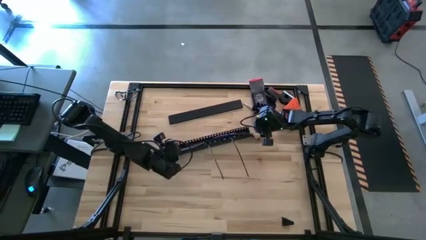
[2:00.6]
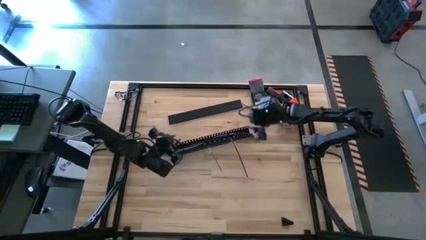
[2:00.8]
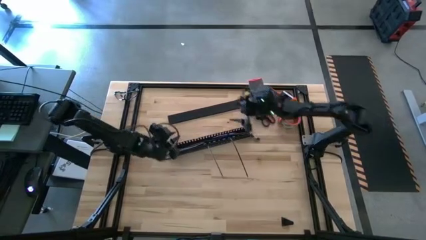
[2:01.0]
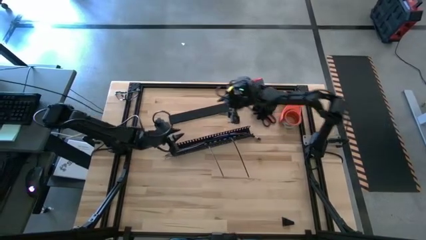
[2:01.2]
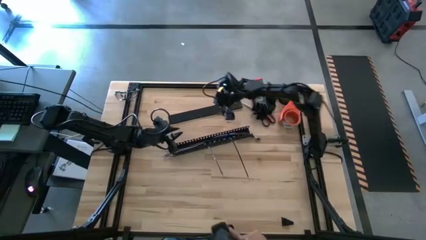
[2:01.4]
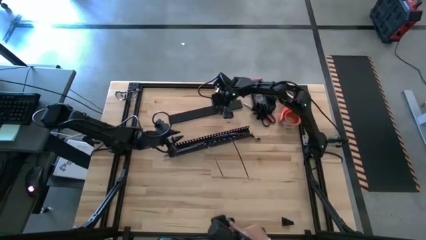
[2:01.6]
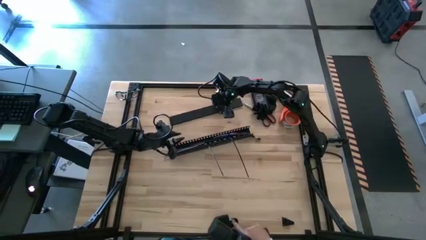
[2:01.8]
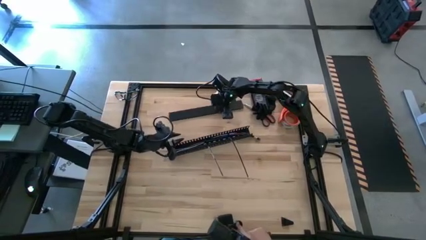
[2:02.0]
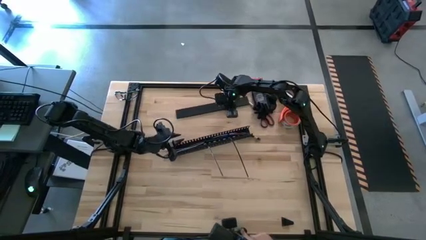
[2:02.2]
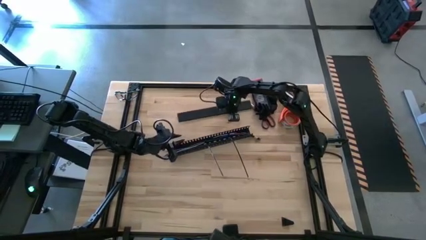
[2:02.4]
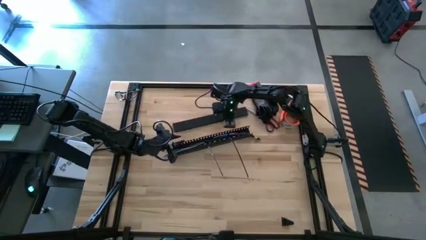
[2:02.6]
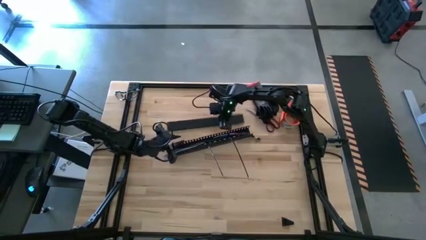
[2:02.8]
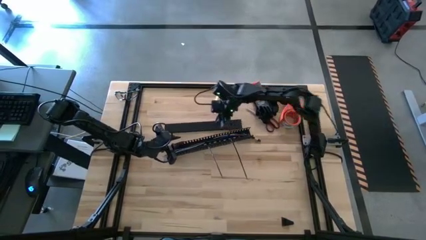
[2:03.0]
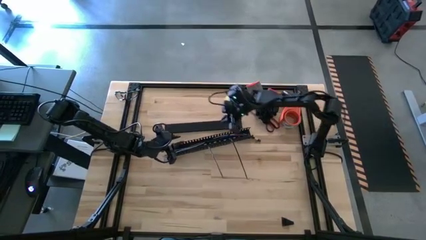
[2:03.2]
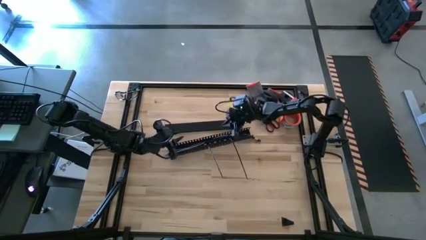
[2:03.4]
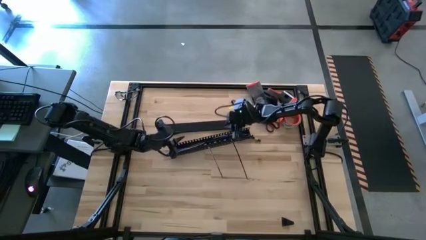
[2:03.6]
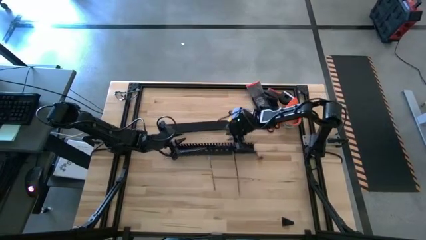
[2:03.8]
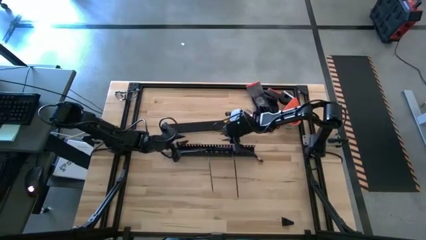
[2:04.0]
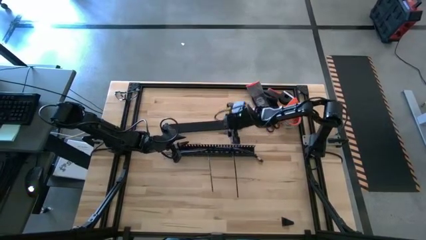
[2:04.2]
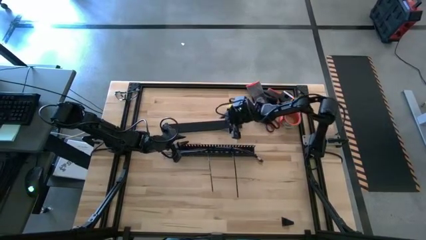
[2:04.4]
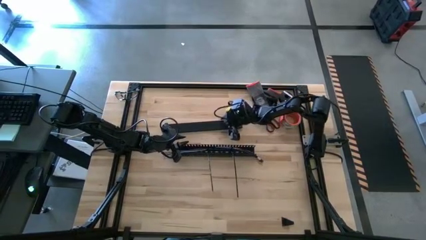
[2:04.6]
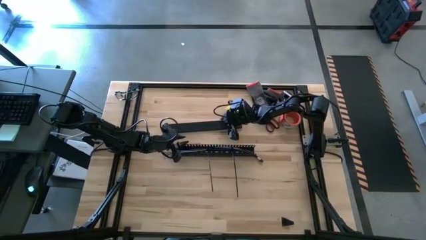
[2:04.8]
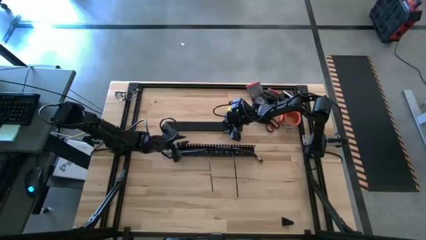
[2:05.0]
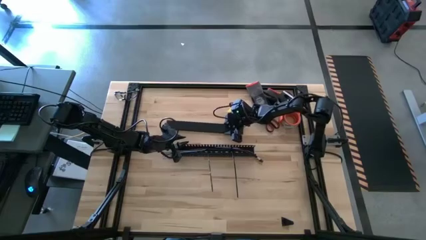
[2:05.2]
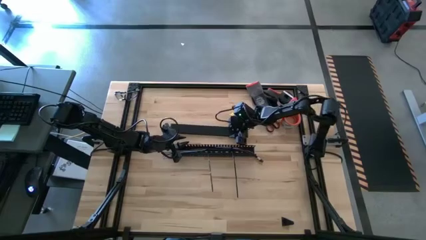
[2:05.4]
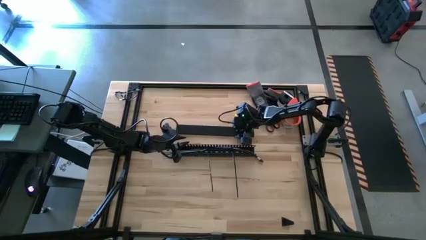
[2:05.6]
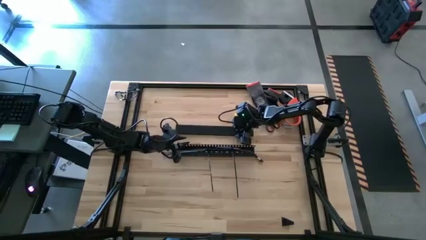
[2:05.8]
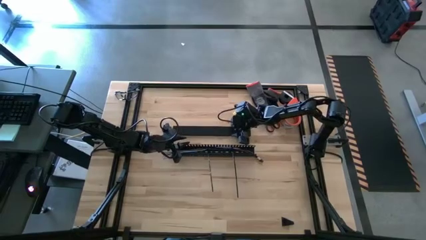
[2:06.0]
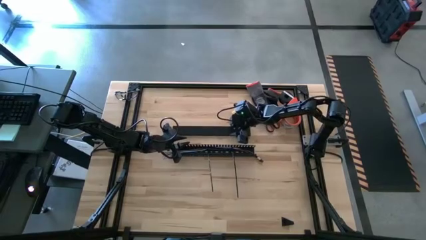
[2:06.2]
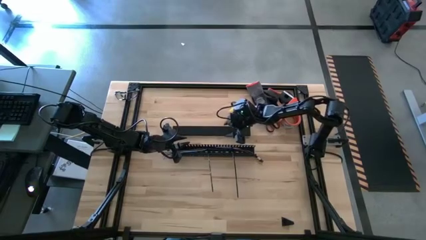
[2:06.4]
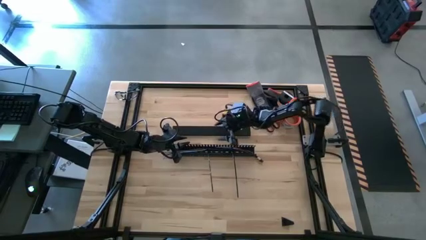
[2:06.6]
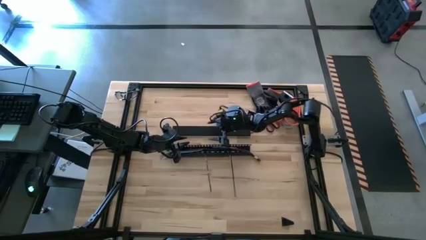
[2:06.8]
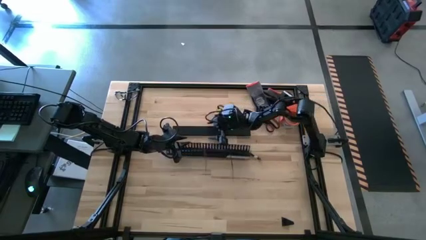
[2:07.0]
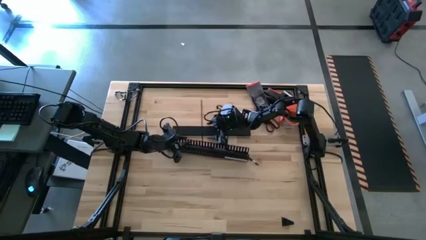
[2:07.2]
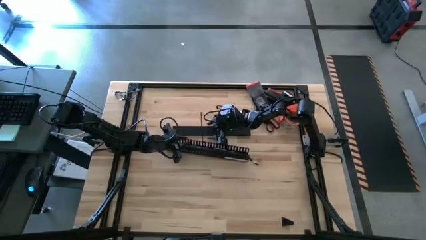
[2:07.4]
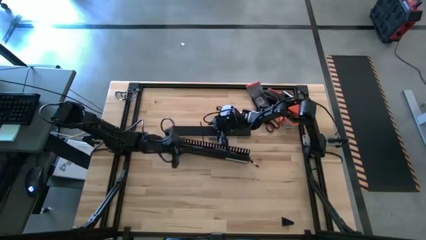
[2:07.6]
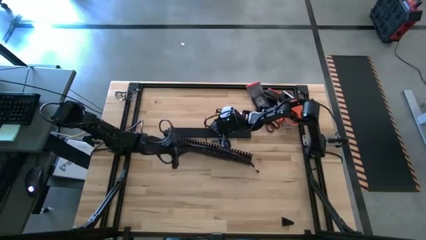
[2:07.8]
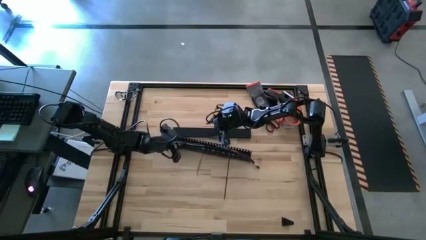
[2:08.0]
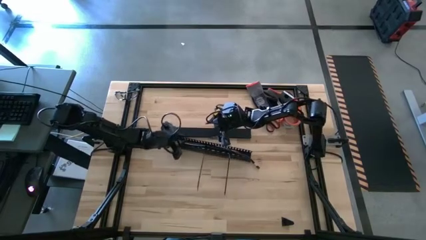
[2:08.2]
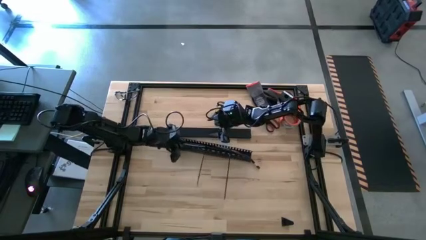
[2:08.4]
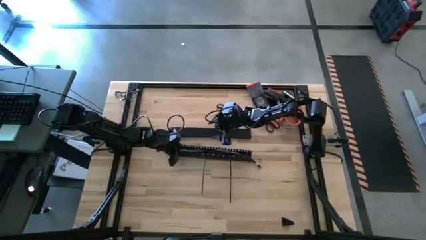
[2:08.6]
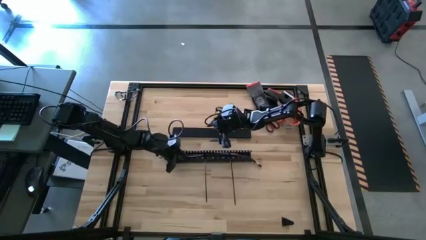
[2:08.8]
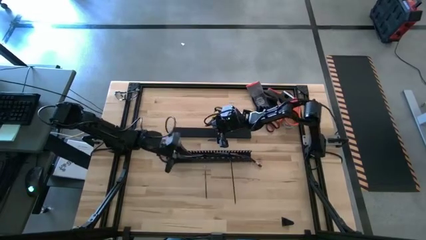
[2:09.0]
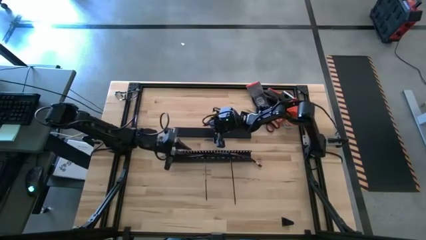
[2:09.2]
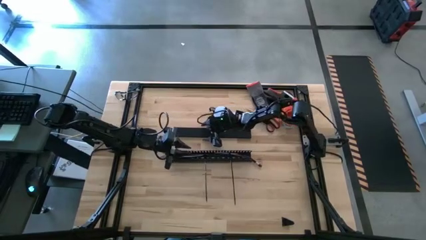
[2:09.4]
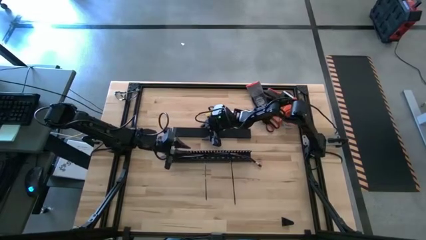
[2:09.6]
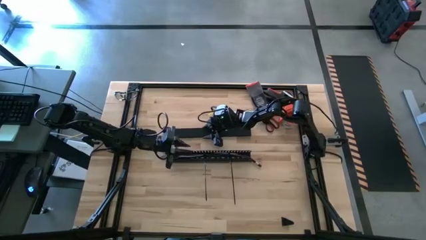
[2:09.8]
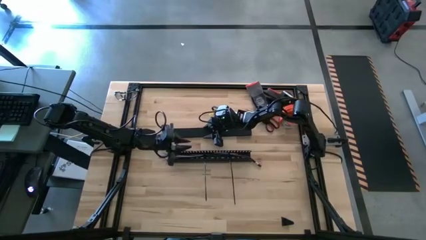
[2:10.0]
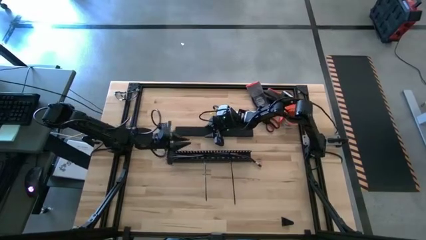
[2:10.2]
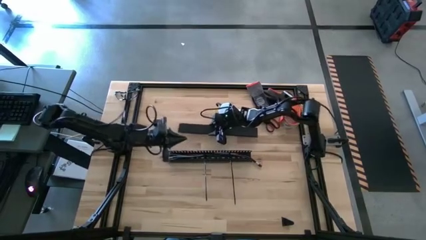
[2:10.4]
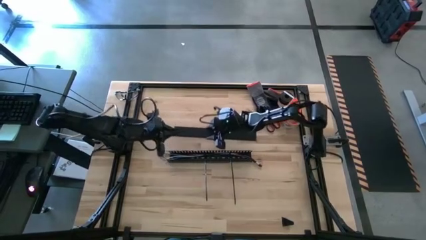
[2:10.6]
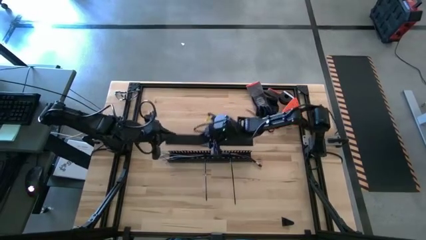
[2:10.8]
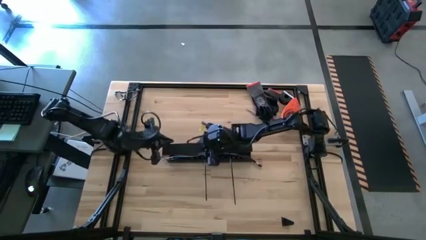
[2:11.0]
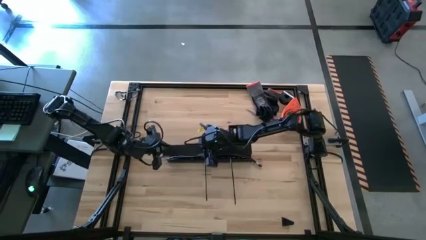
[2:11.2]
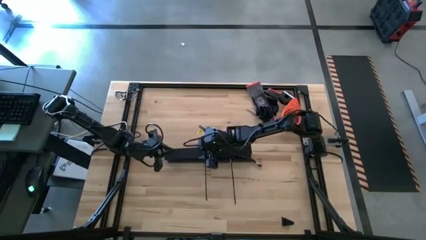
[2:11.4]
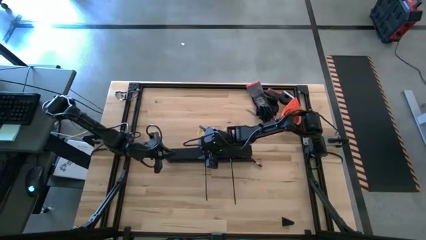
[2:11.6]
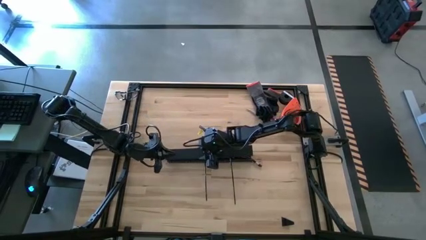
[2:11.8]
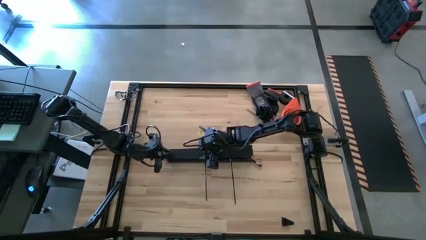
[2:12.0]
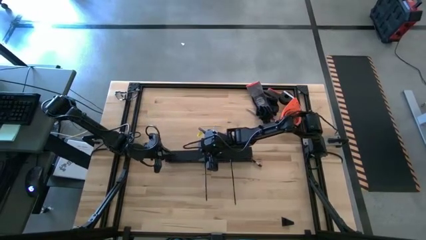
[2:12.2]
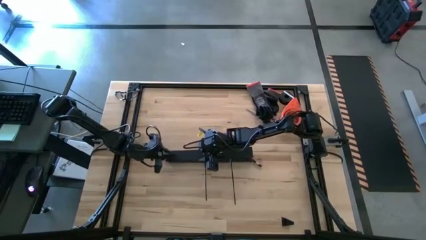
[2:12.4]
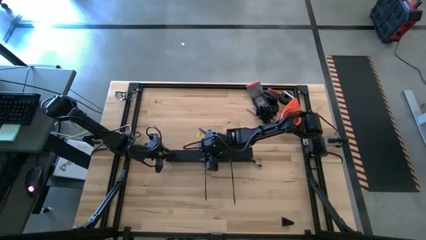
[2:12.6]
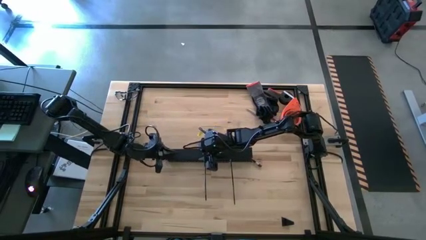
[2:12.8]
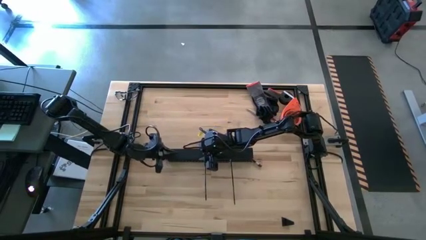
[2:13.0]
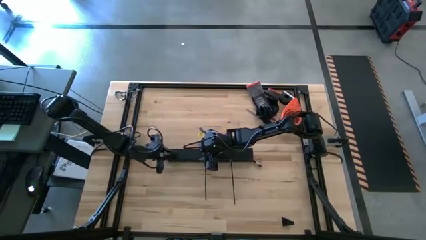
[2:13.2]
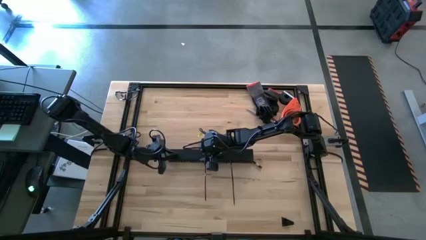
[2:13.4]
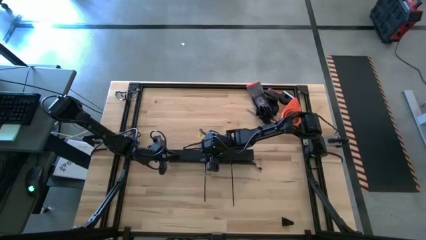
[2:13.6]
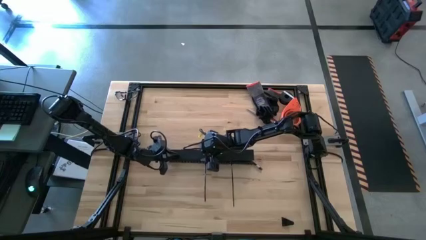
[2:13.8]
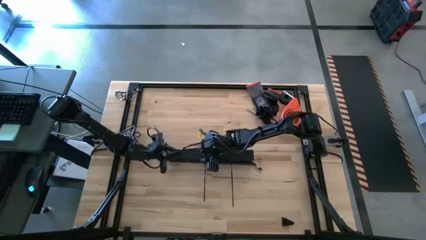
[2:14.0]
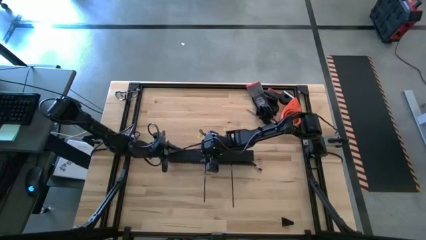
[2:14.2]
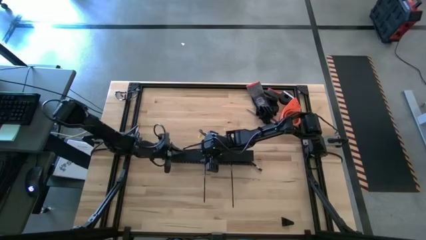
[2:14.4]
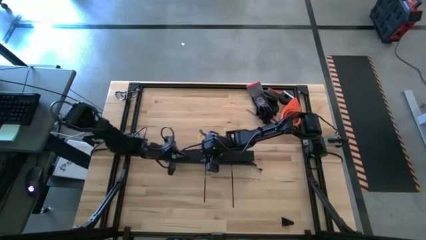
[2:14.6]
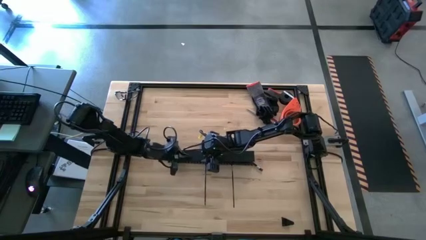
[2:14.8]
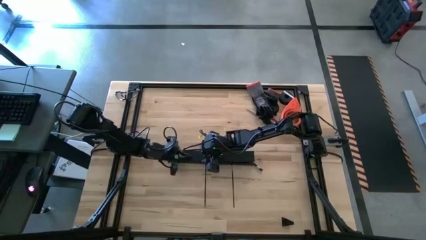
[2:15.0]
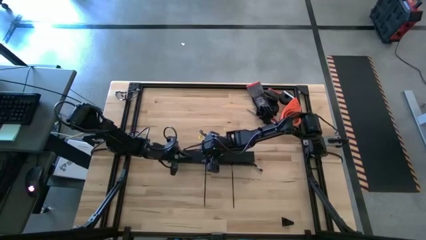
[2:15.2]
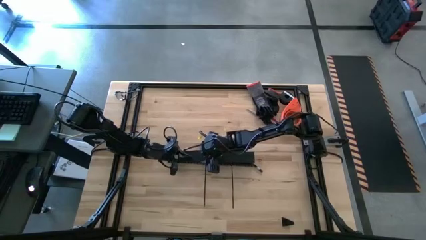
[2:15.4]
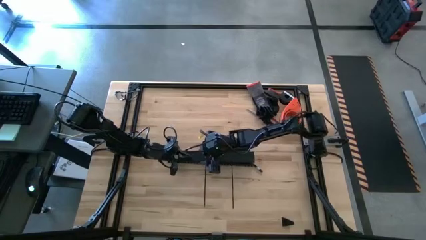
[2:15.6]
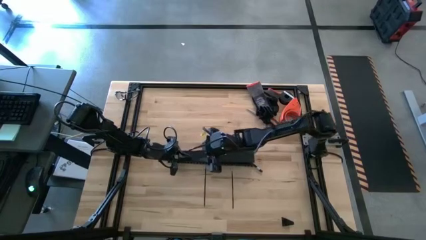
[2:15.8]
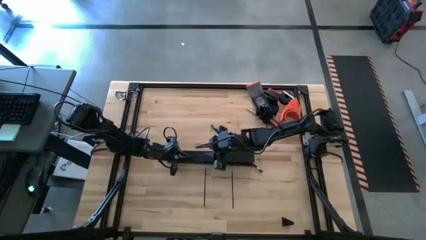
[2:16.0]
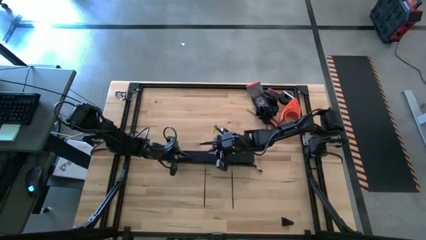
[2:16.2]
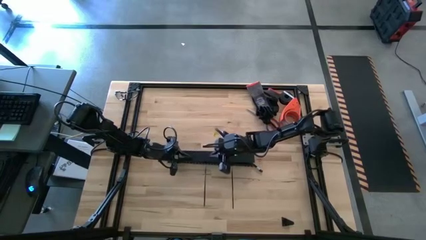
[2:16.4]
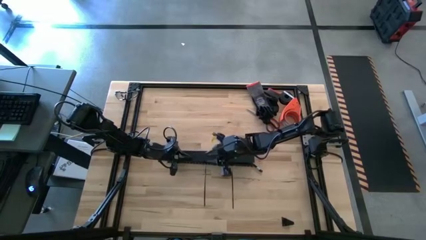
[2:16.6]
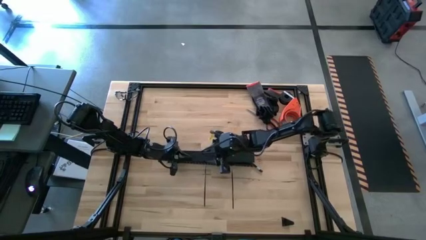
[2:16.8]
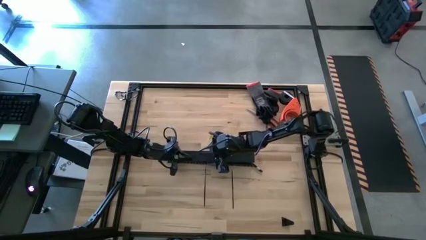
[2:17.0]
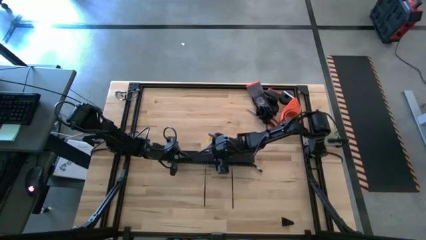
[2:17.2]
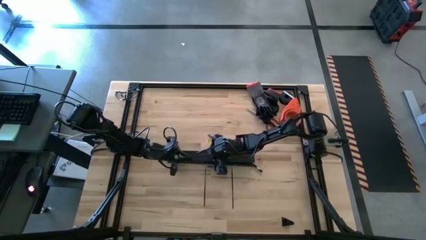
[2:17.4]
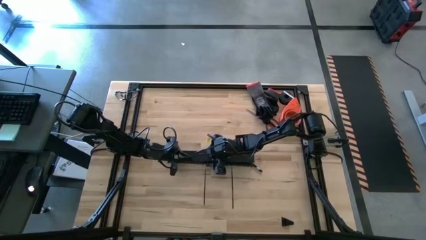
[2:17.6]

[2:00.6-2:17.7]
Task: Ziptie cables
Close the black cable duct
